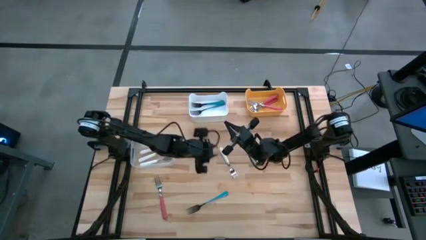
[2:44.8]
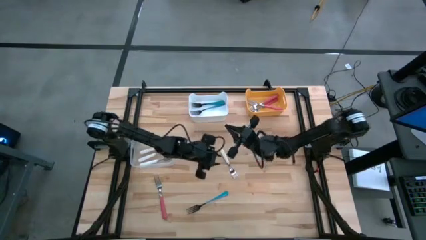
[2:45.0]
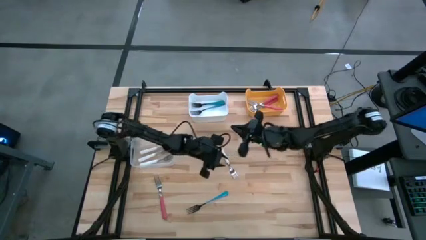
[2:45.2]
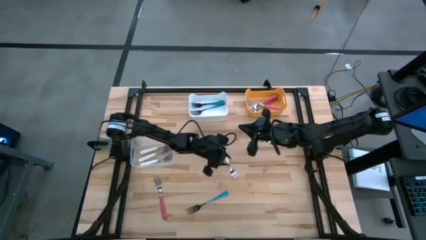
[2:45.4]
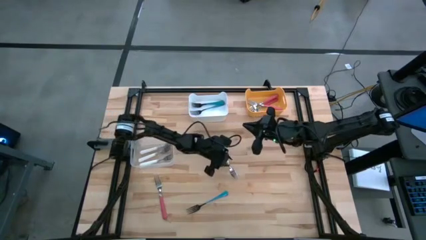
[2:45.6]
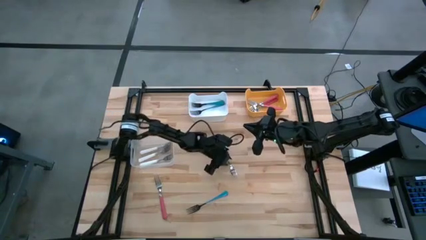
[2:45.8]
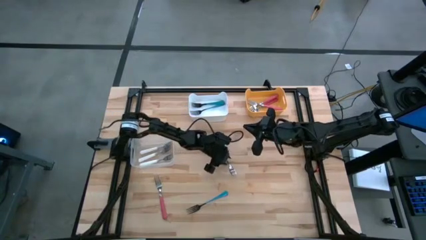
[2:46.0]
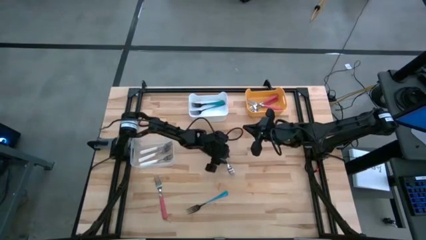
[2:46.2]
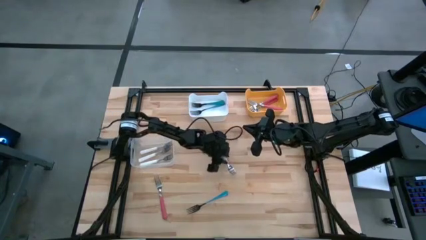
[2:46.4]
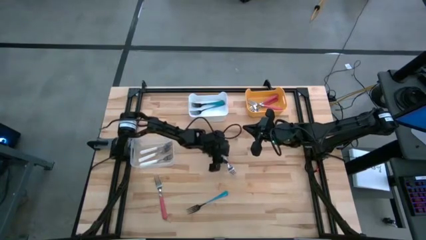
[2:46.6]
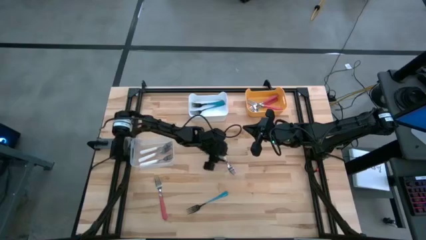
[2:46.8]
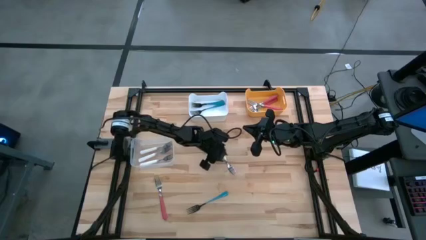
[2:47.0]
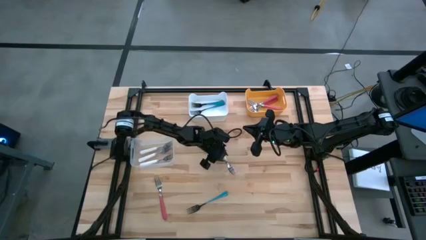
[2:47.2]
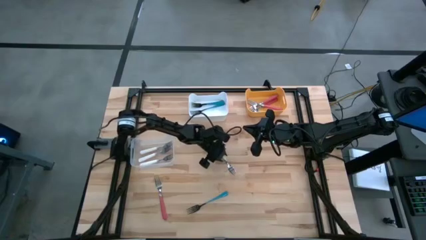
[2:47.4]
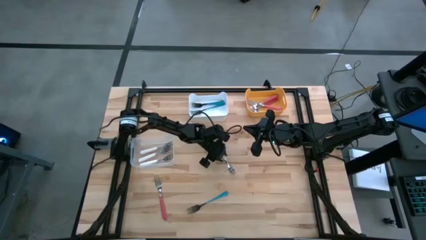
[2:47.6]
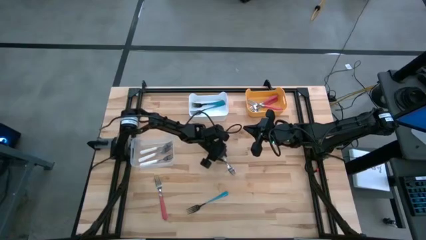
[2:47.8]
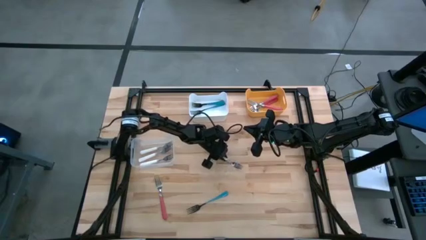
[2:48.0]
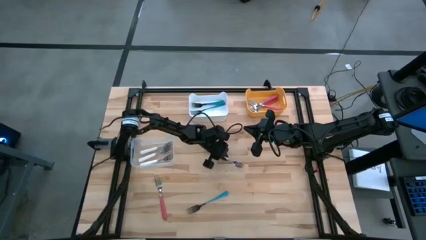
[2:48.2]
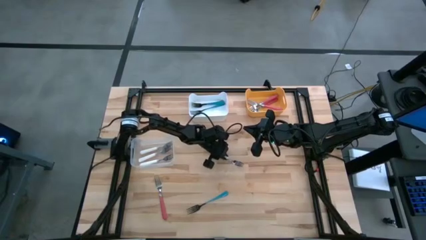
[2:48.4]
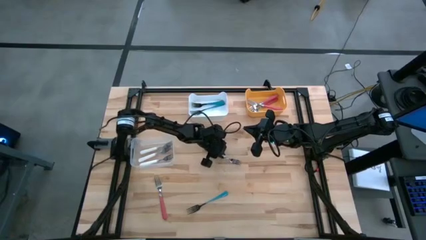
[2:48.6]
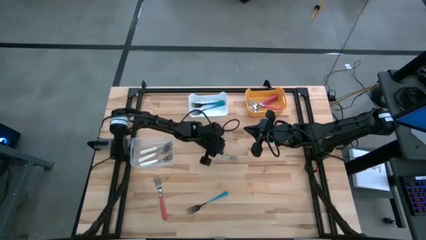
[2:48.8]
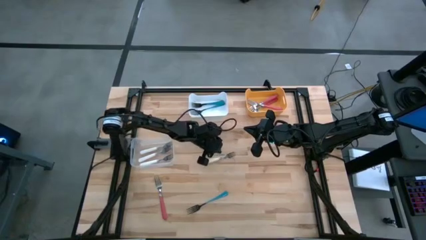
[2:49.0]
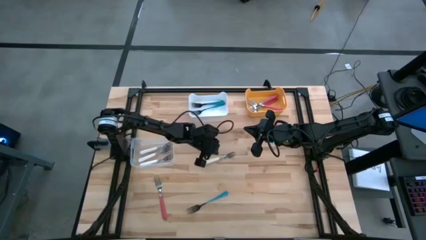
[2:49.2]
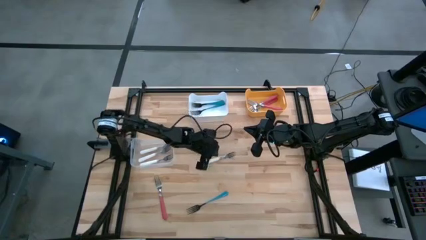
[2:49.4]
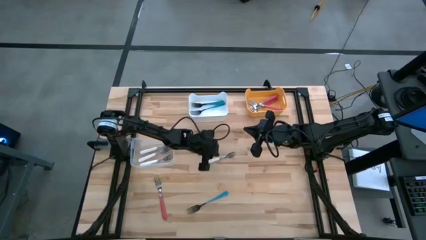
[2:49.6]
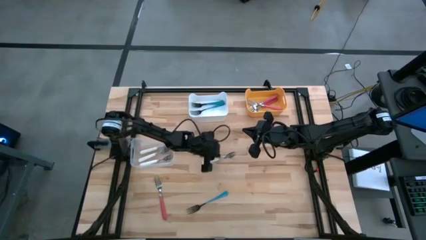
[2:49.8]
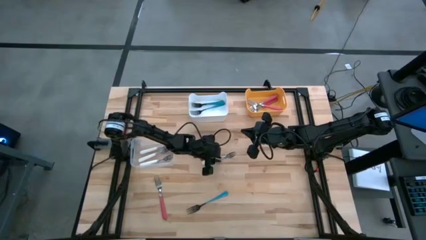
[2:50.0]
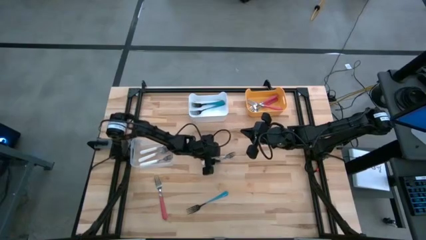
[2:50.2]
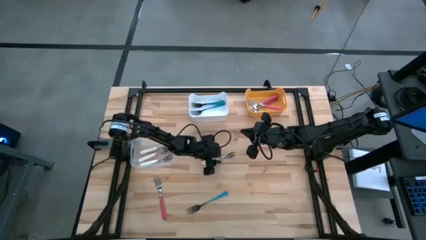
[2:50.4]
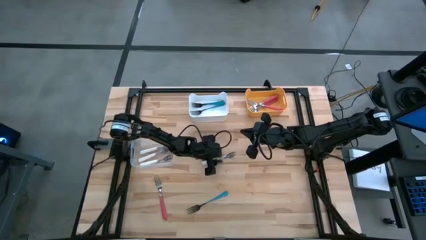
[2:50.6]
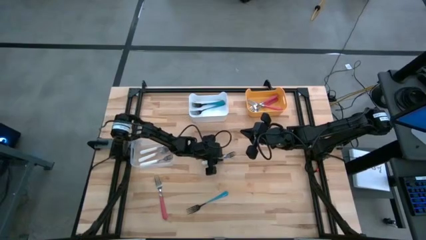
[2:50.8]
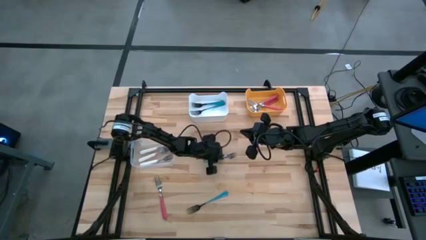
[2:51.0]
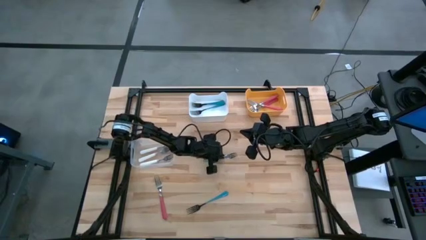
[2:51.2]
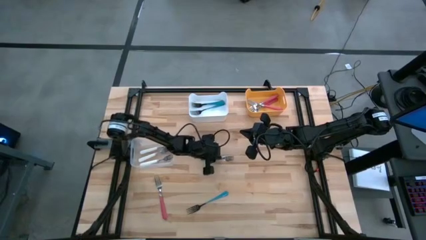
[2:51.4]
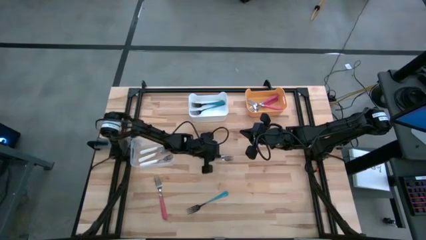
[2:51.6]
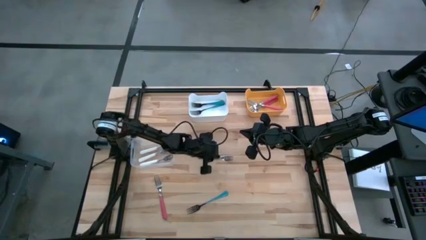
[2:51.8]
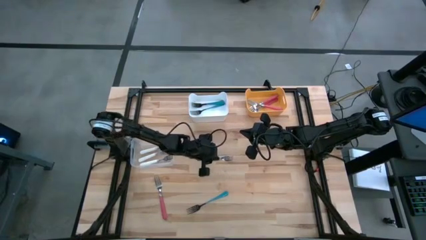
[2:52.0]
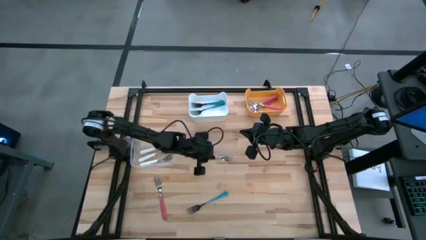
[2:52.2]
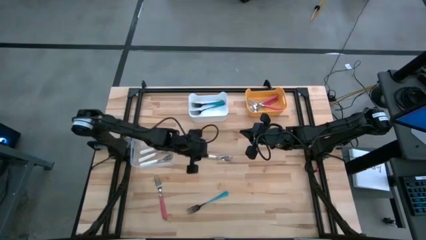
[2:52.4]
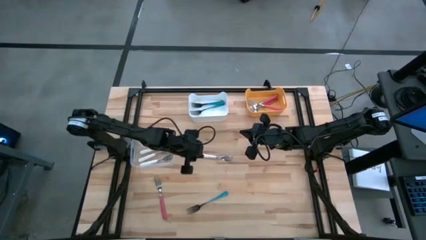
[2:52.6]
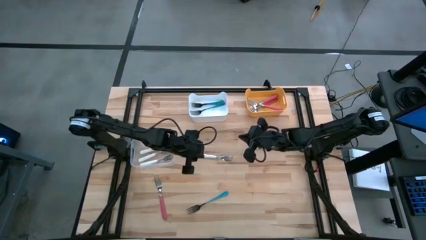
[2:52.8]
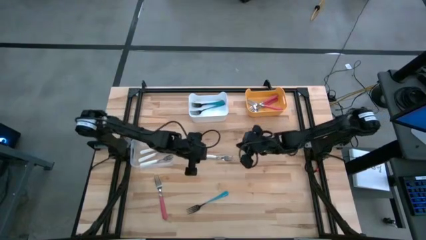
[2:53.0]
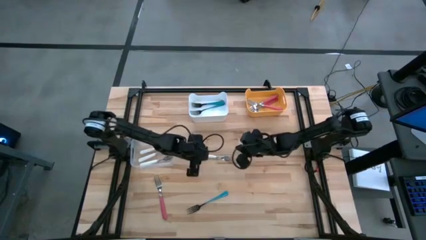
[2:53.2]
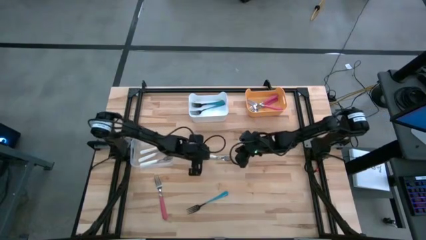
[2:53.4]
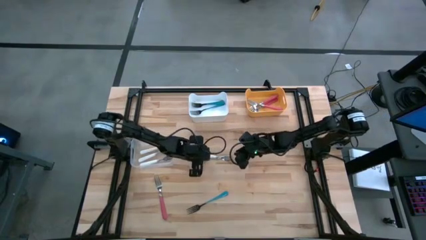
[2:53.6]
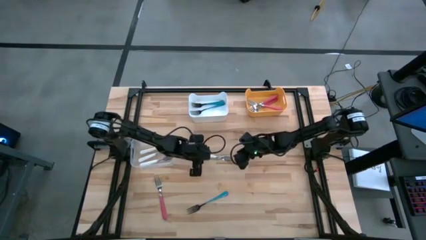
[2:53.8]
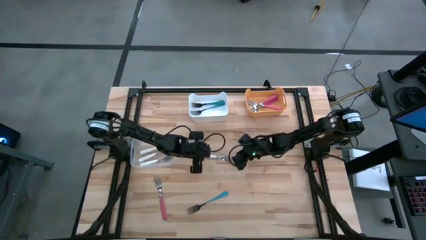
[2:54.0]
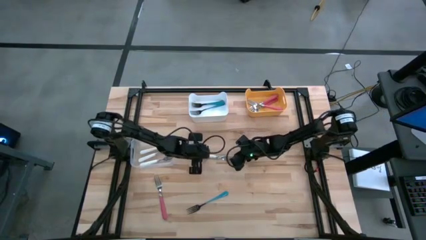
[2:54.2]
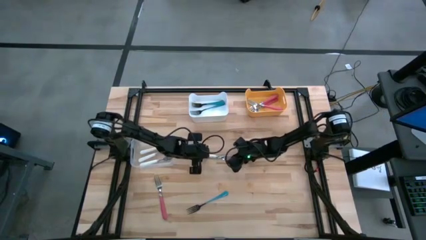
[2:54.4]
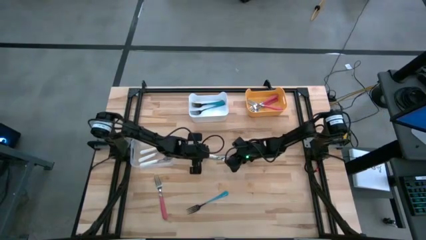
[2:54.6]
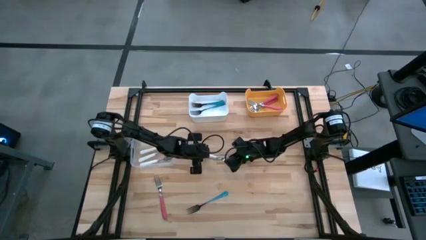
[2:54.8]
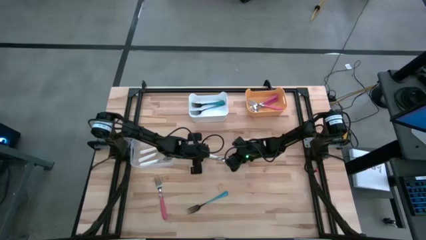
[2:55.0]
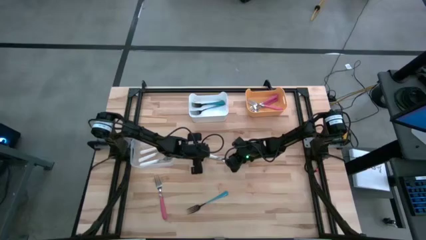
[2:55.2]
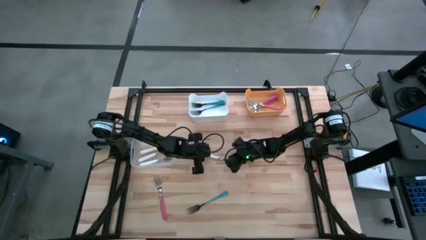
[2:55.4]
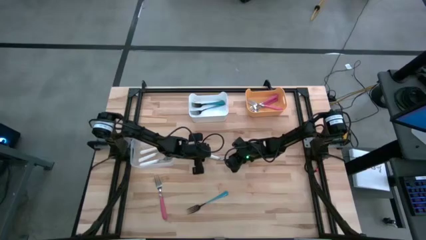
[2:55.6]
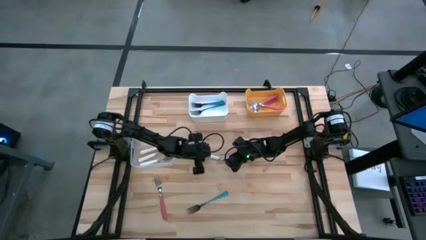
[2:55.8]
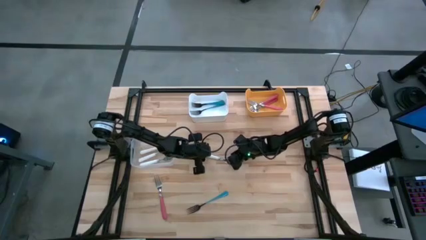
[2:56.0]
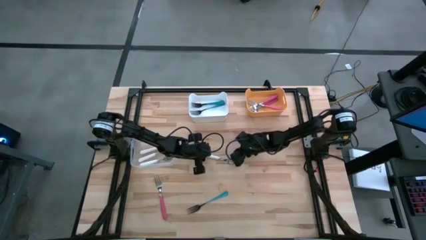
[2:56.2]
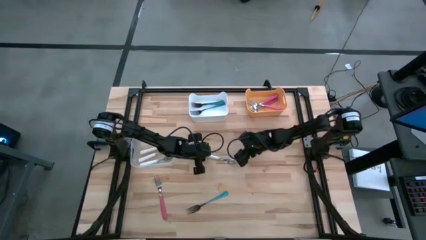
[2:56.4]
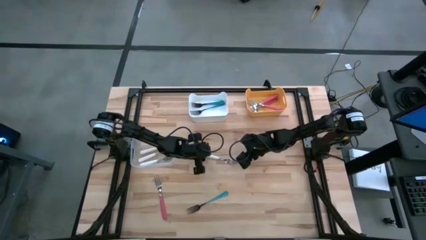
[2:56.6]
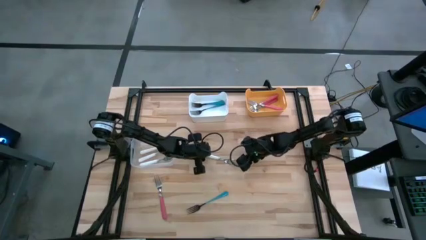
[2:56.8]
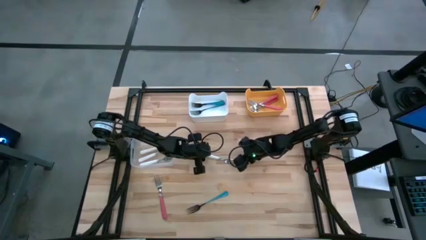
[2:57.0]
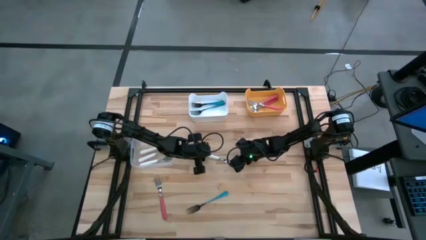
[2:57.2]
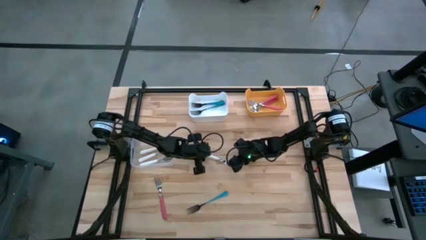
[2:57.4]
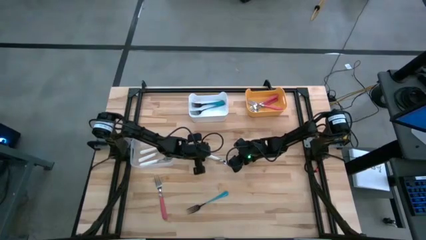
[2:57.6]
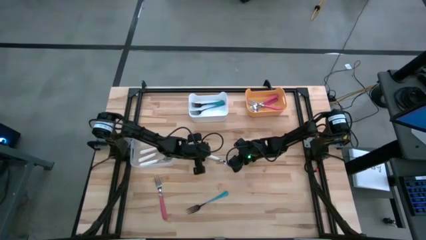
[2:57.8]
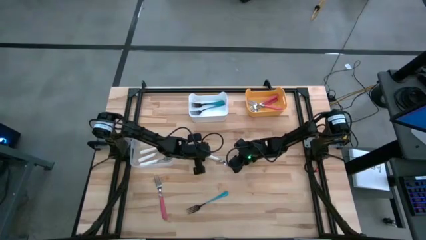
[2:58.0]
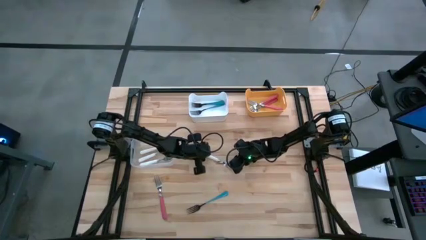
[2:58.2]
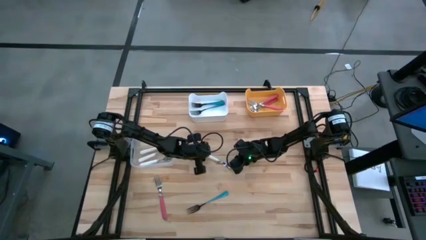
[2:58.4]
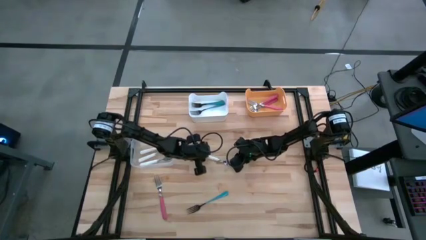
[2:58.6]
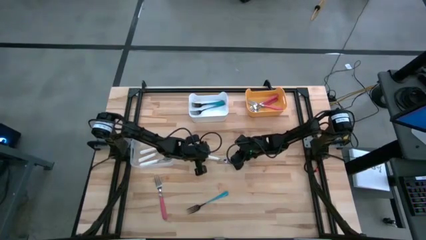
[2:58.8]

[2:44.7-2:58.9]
Task: Sort silverware by color (type)
Put the white fork into the transparent bin

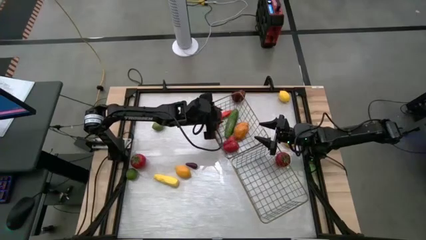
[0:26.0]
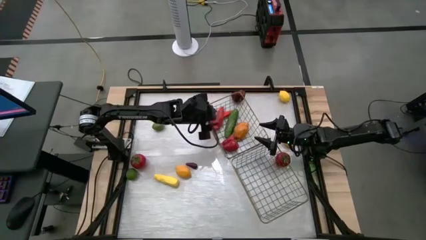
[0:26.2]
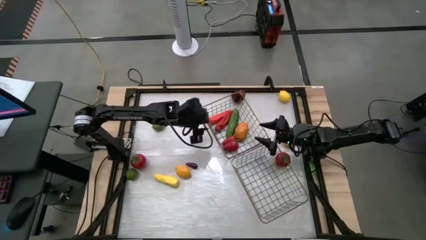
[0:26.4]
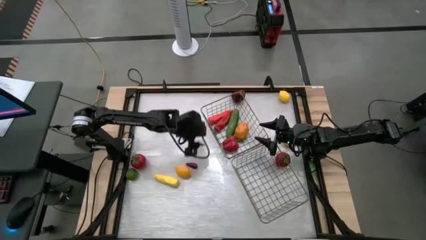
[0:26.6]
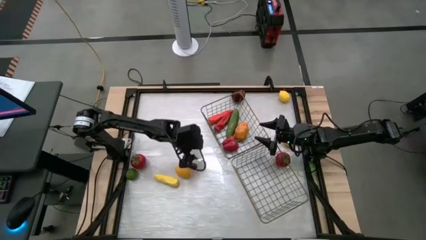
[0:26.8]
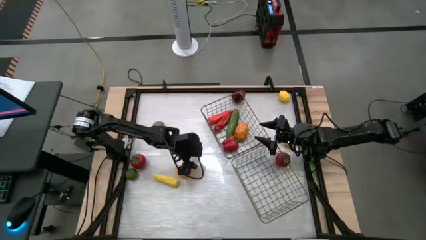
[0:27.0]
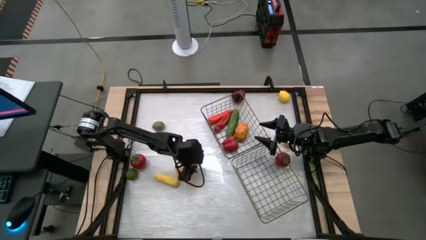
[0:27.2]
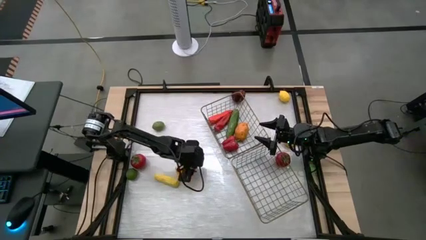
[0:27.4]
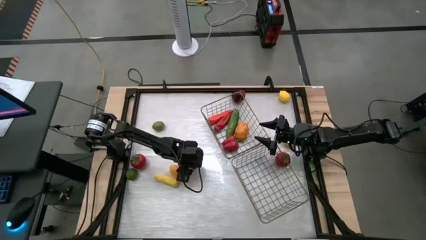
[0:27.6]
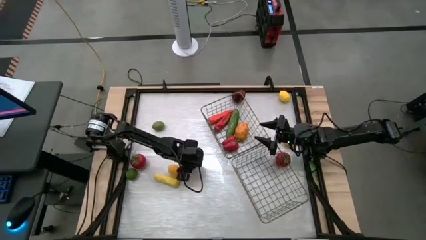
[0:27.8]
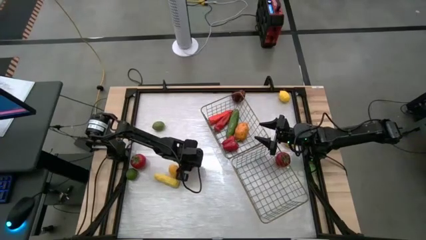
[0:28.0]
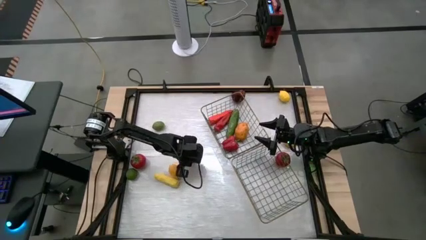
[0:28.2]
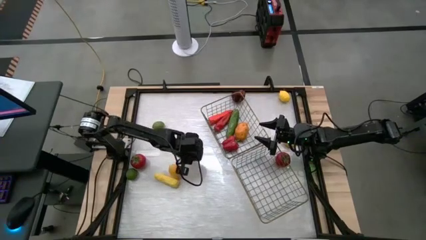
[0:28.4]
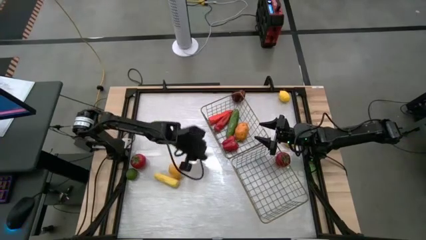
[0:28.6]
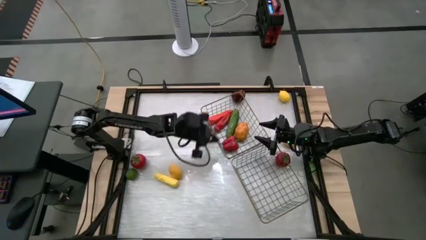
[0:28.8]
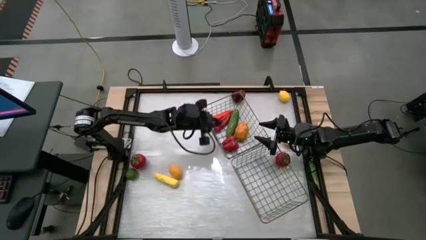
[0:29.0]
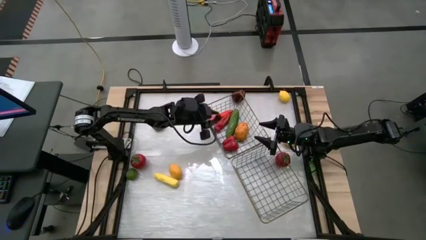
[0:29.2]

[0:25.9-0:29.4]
Task: Sort produce into baskets
Put the eggplant into the left wire basket
